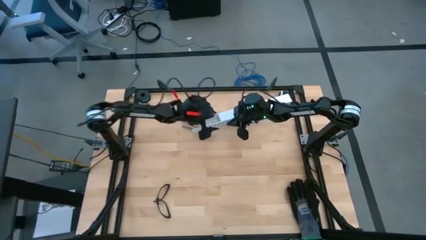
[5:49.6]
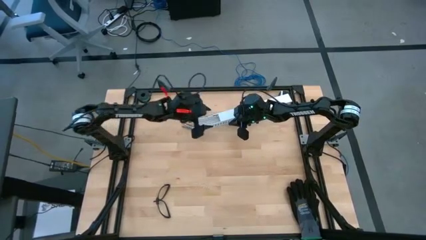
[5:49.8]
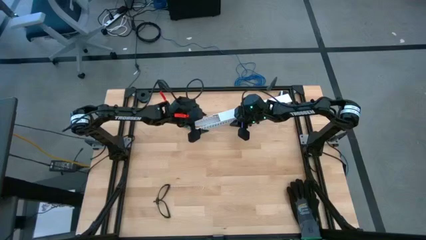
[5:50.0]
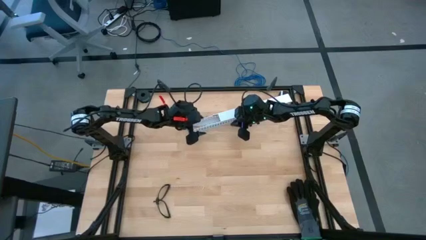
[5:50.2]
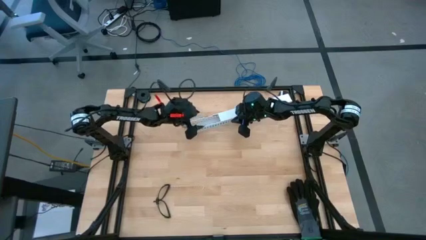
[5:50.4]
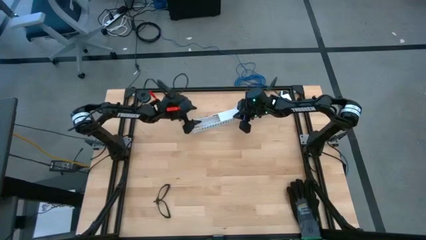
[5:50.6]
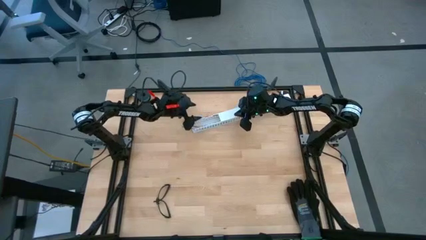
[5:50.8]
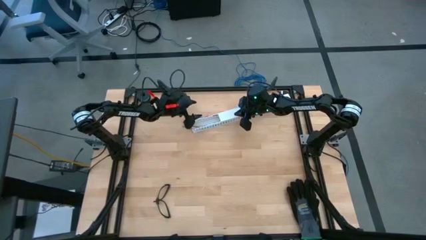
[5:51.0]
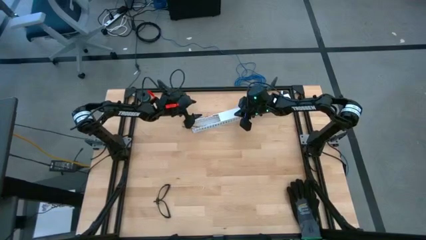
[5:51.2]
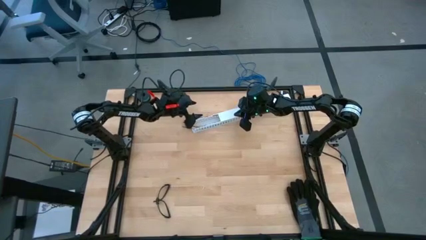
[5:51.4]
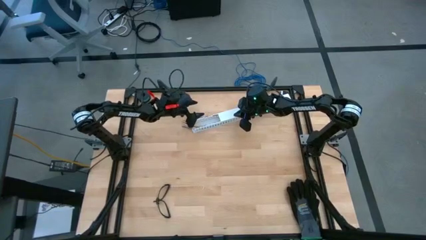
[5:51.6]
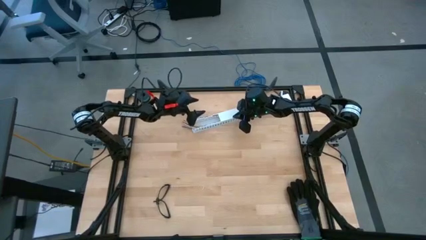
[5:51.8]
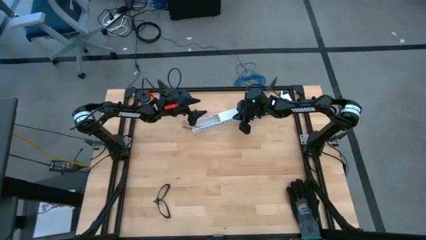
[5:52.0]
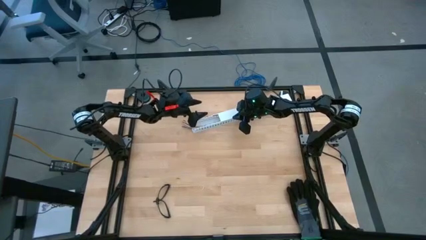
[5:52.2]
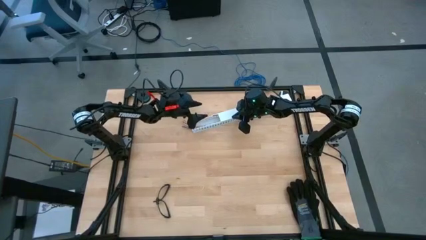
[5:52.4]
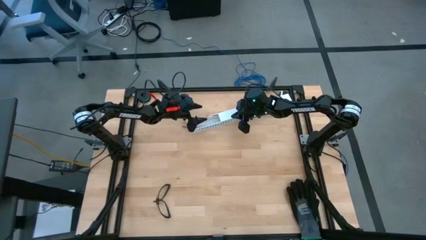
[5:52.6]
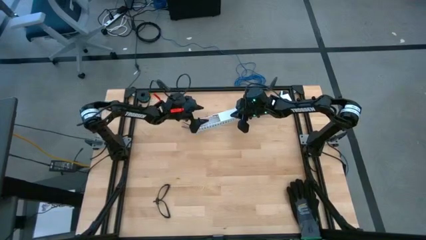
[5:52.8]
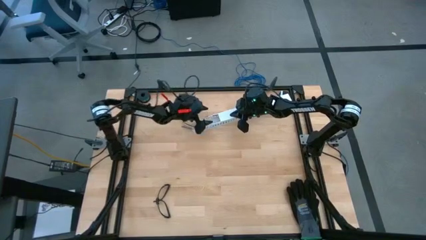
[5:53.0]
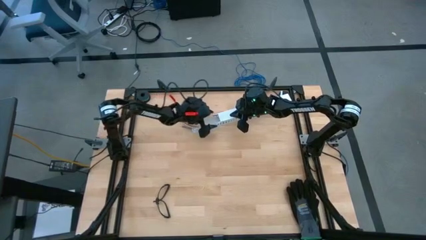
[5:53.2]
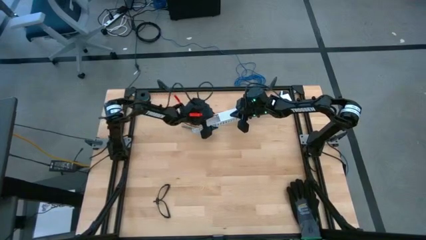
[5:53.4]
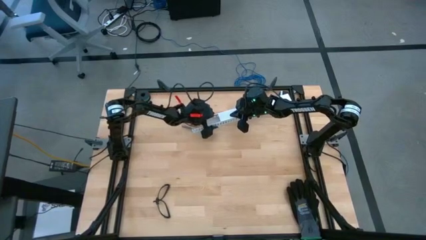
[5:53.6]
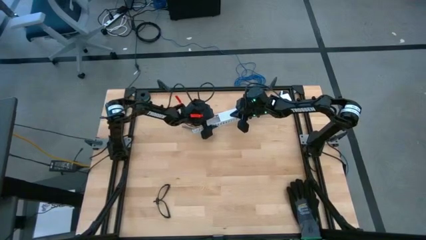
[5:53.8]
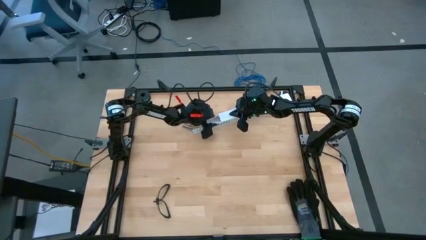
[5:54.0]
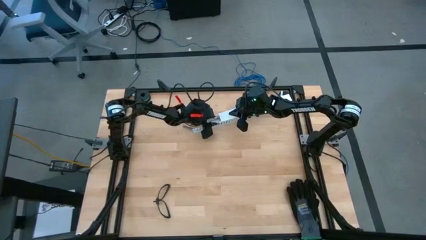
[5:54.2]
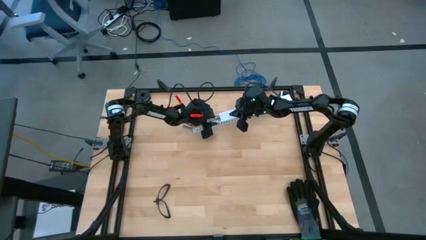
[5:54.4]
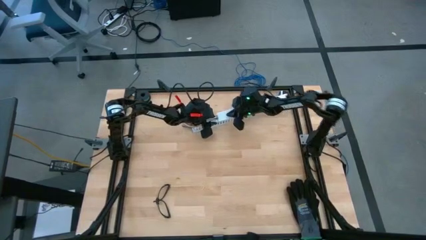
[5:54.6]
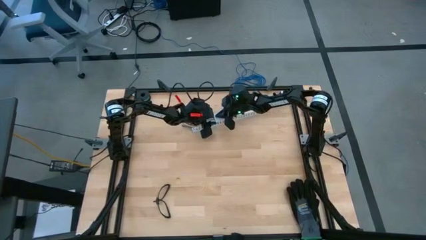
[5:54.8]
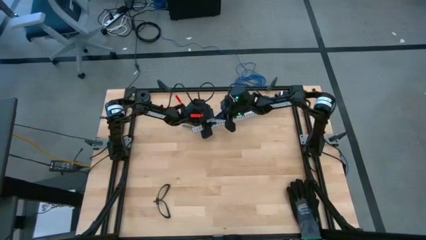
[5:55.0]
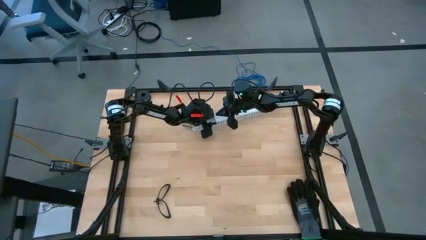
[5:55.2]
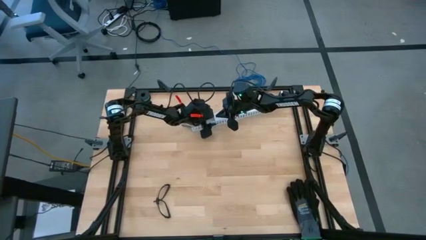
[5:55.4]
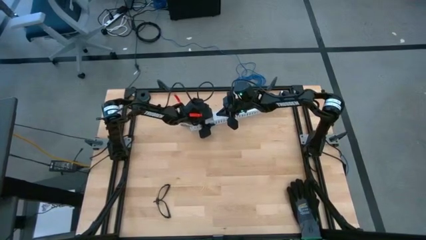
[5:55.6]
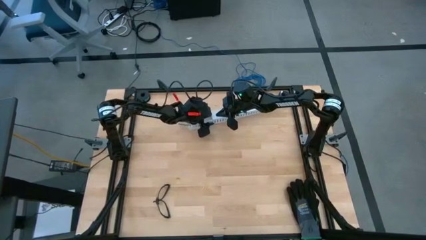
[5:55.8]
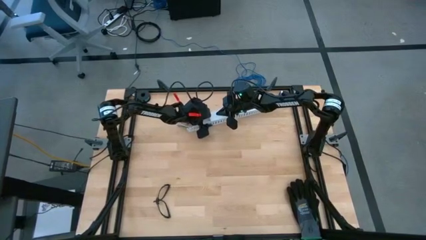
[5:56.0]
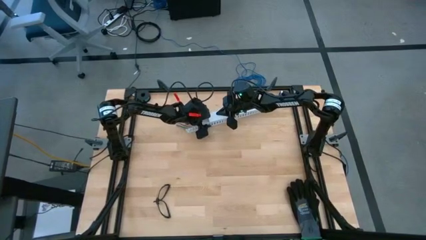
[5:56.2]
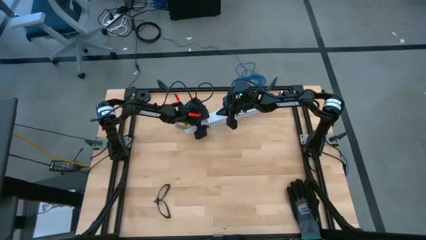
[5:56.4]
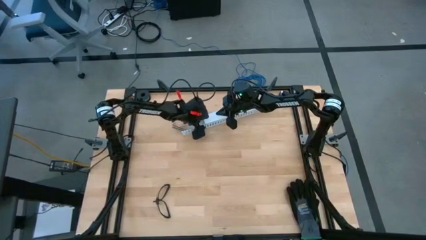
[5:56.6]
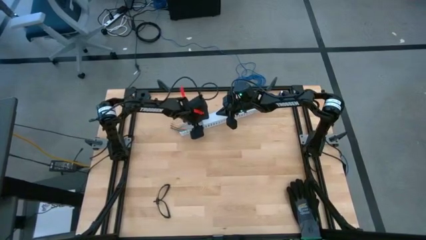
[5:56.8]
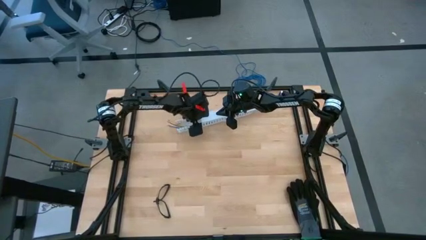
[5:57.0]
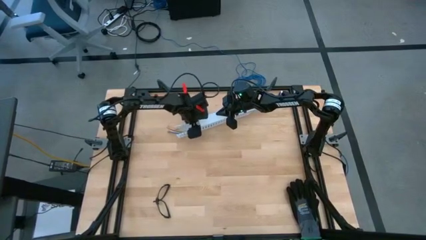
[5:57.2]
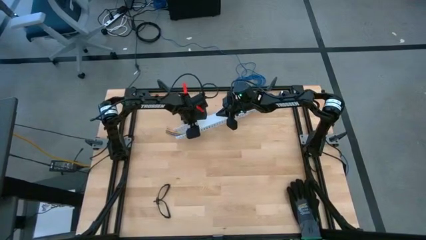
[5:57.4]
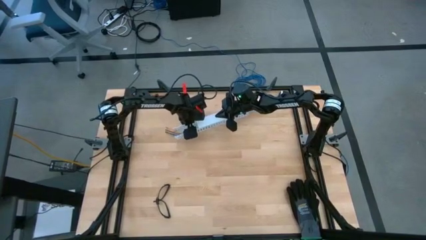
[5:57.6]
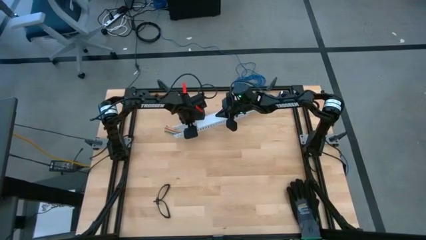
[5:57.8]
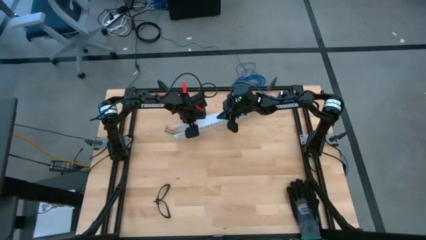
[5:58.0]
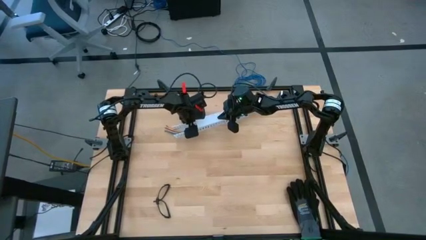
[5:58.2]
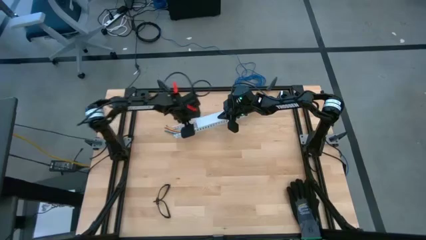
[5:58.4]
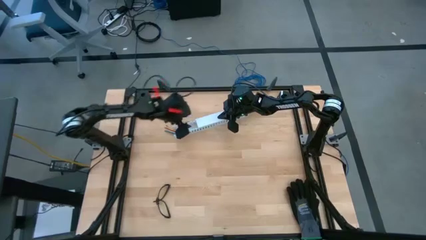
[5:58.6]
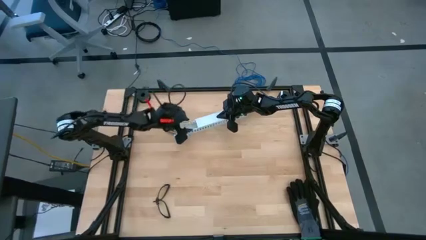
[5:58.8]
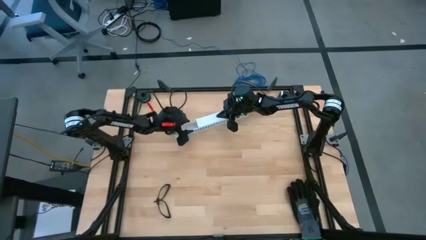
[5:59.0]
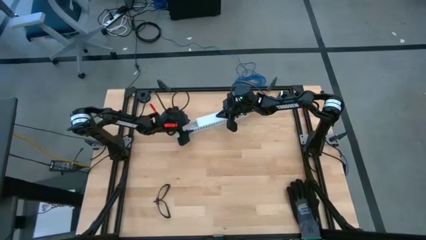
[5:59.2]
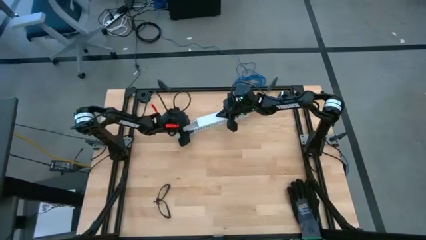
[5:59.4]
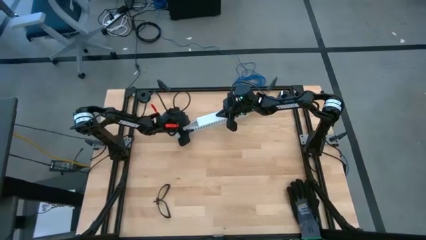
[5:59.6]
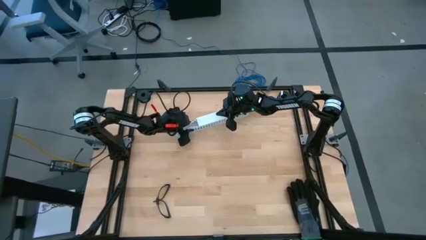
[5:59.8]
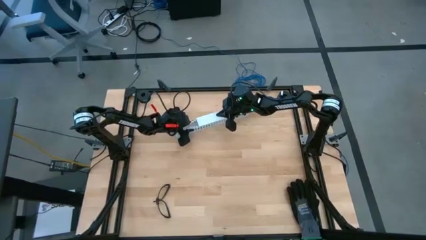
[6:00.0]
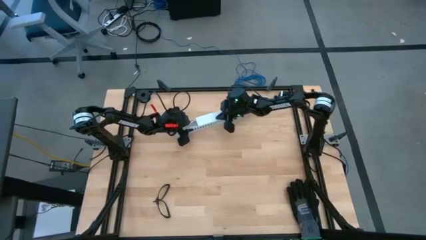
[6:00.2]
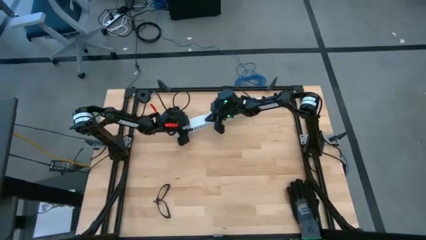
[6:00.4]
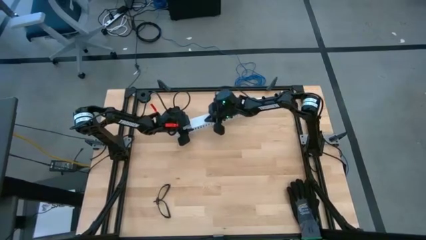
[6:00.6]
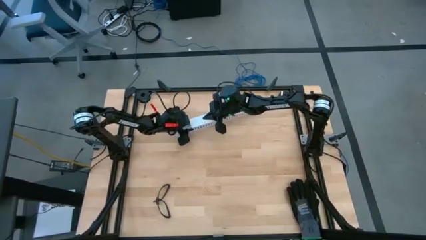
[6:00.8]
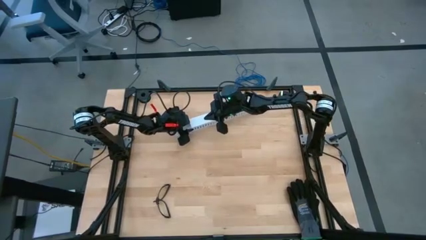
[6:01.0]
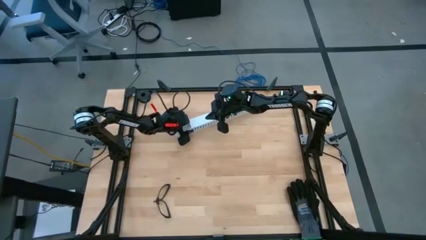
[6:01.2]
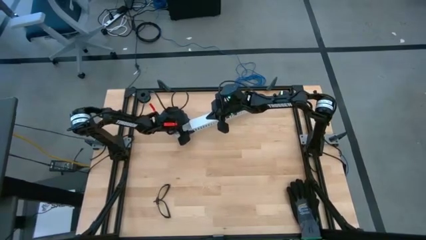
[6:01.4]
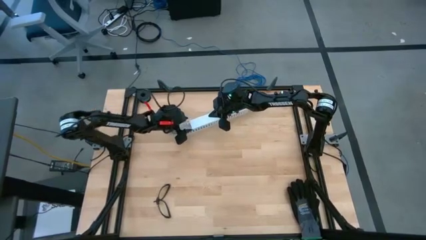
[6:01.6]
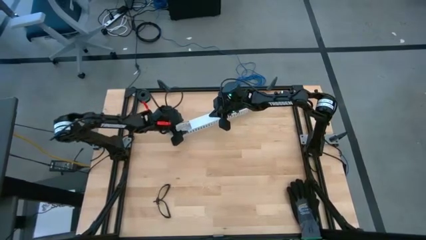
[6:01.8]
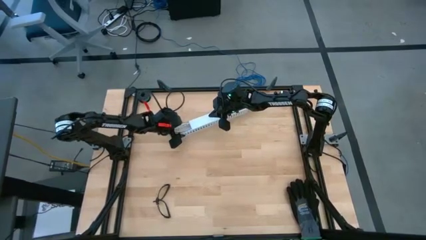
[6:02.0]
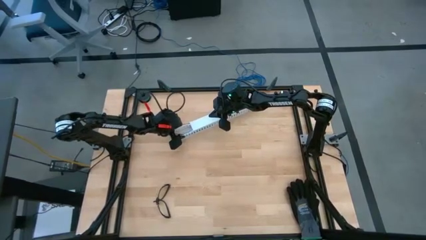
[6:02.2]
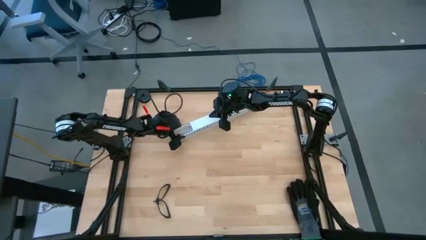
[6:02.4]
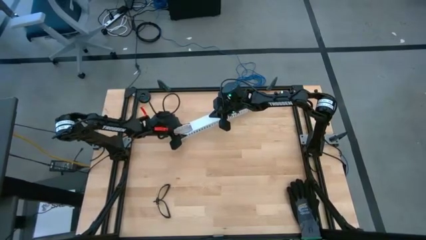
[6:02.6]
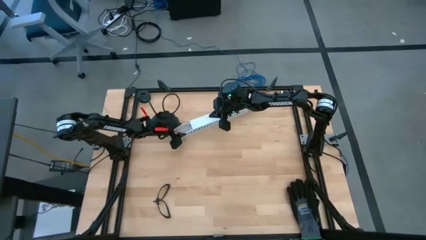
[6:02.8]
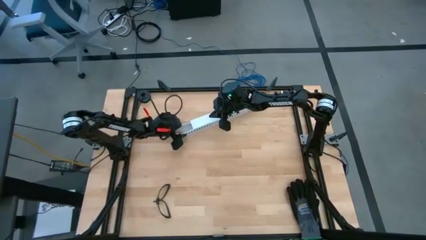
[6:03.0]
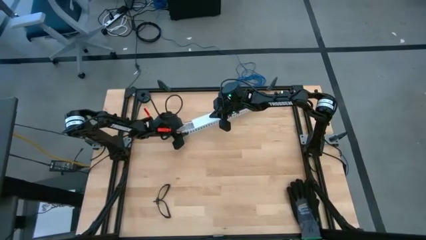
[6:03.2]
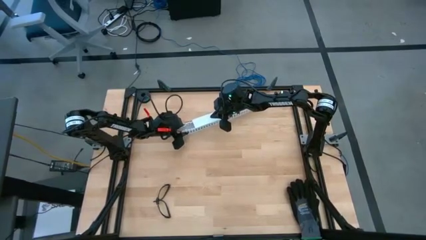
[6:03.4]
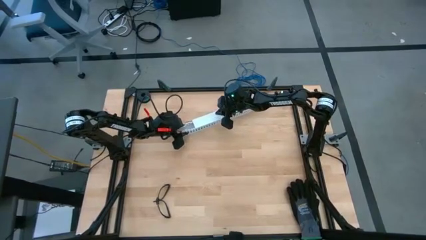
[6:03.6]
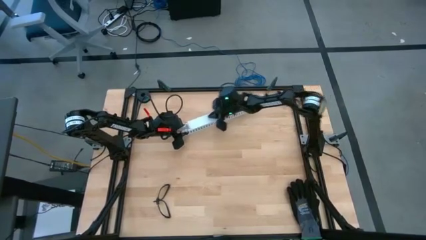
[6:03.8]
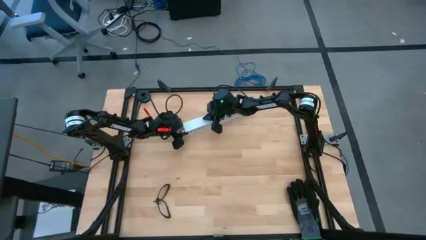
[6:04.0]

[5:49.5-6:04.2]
Task: Ziptie cables
Close the white cable duct lid

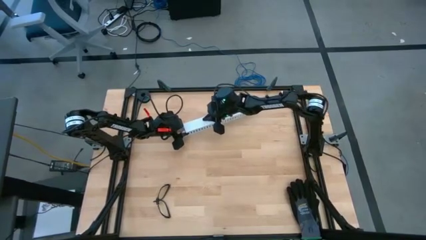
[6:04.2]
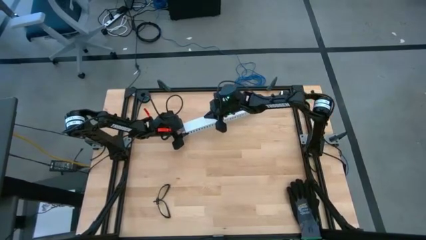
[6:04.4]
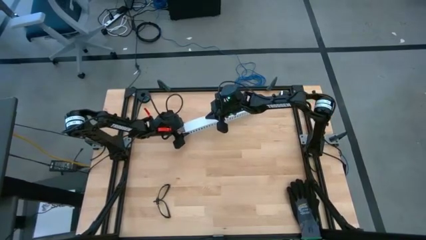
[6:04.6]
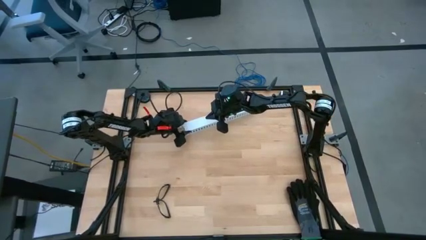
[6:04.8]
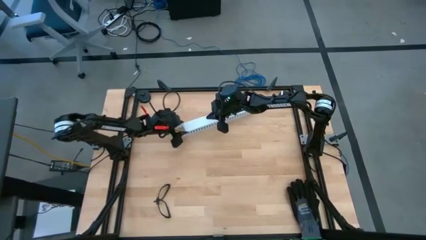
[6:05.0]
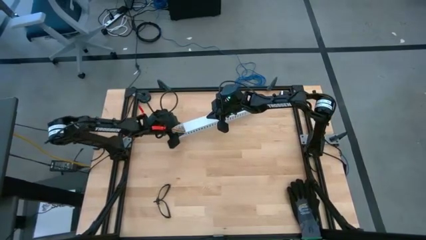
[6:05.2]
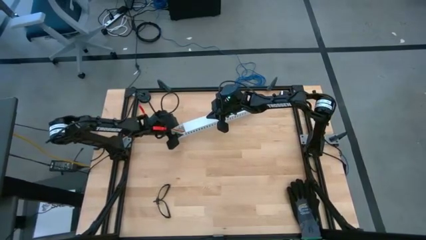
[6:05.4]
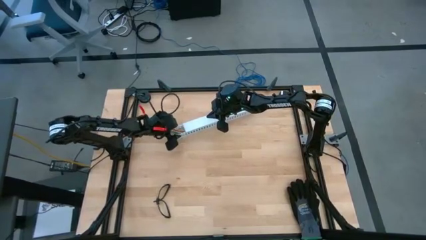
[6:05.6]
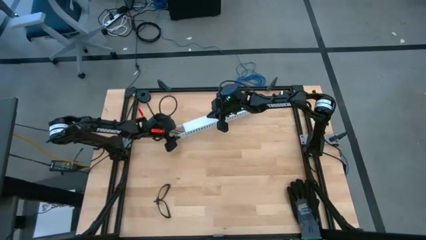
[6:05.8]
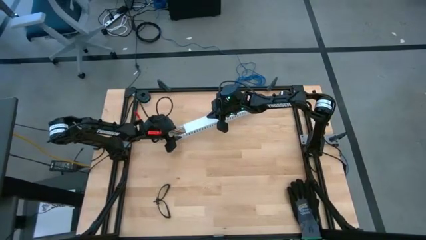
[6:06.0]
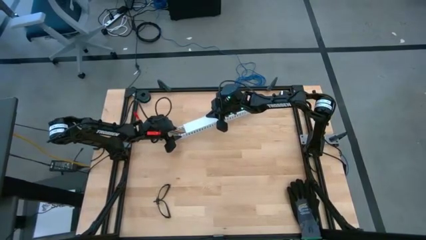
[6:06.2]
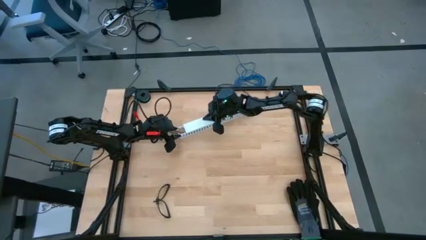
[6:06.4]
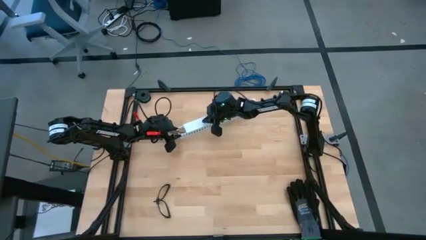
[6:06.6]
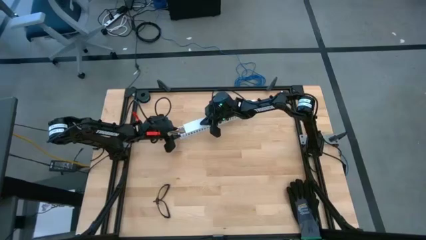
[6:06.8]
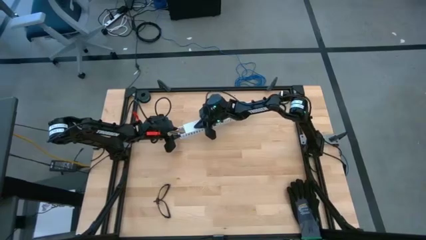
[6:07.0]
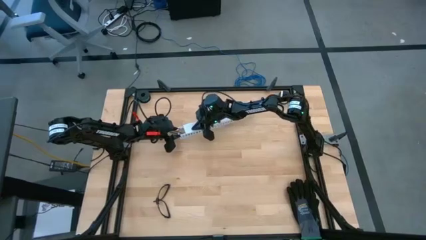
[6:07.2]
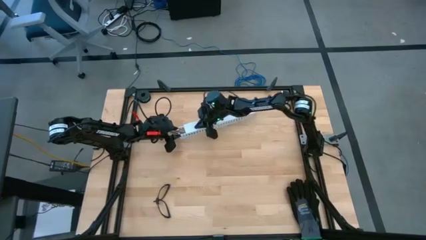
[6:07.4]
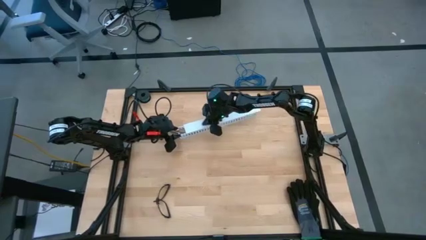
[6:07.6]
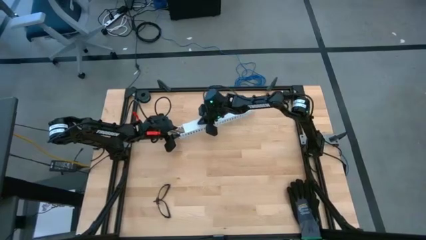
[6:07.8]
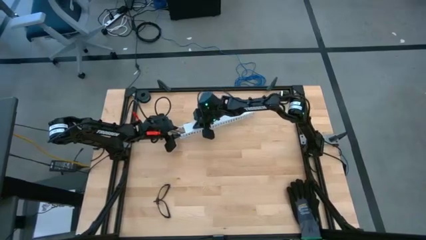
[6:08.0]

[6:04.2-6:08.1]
Close the white cable duct lid
